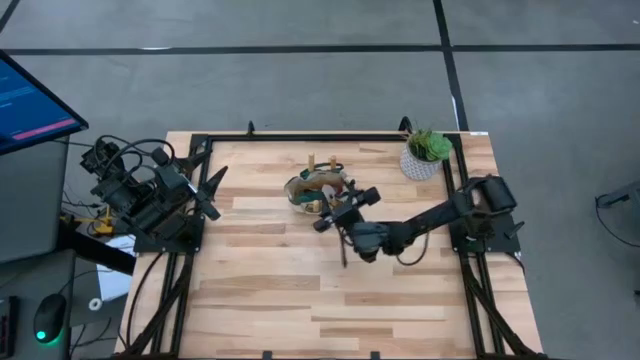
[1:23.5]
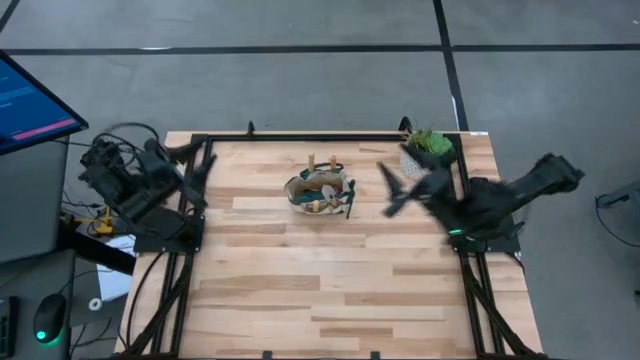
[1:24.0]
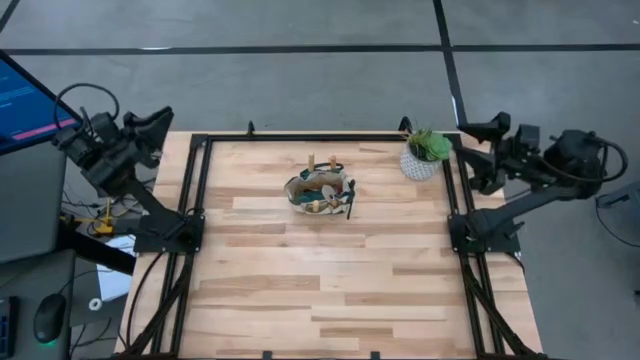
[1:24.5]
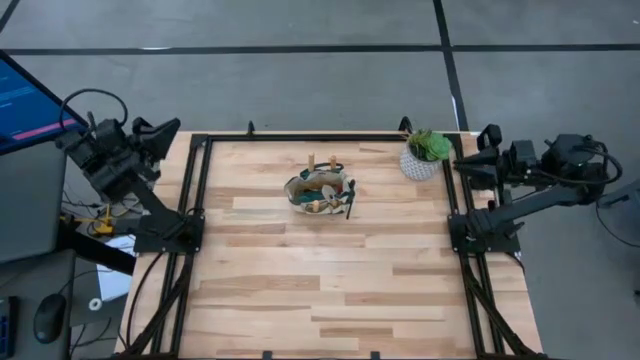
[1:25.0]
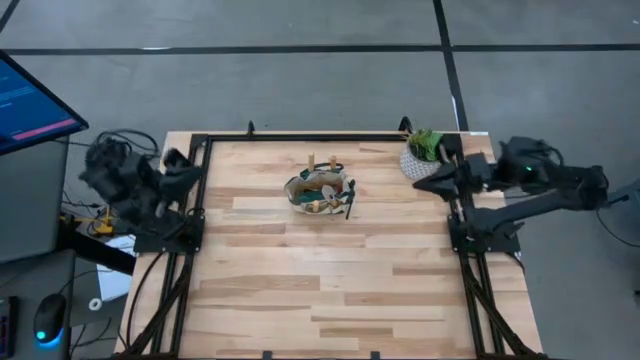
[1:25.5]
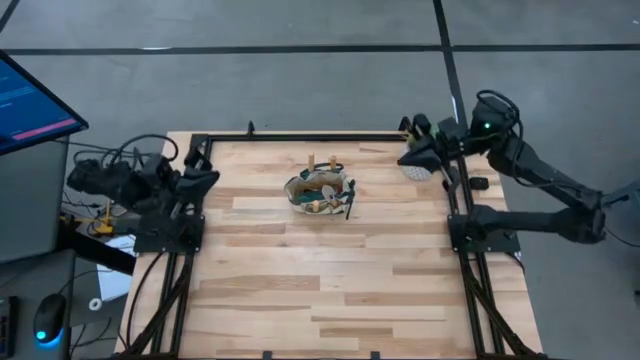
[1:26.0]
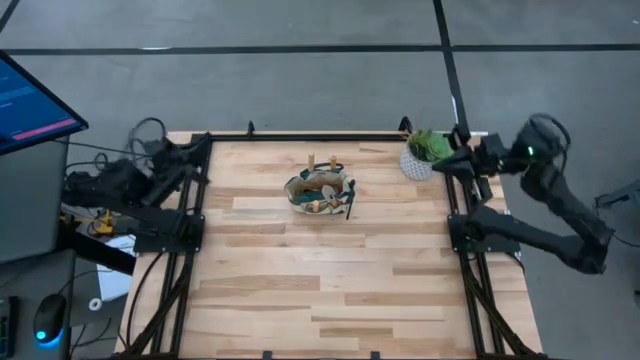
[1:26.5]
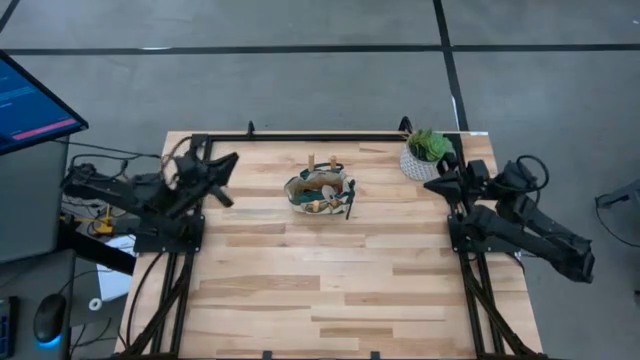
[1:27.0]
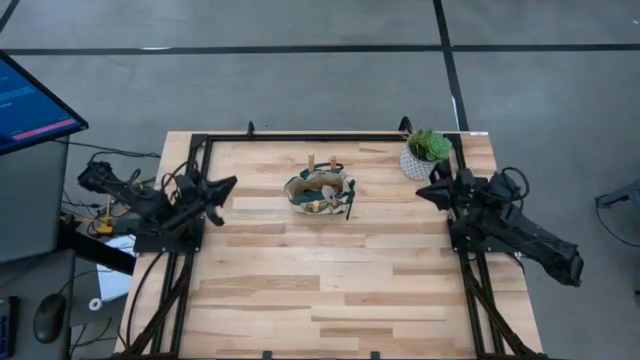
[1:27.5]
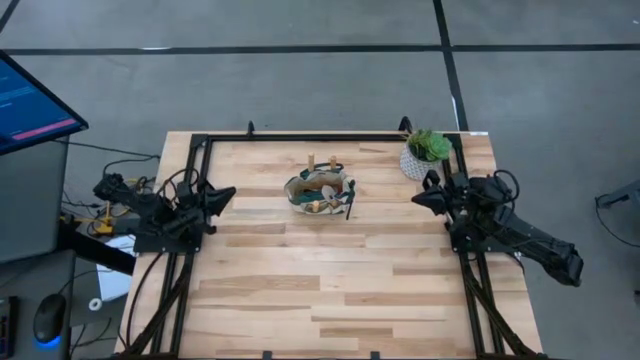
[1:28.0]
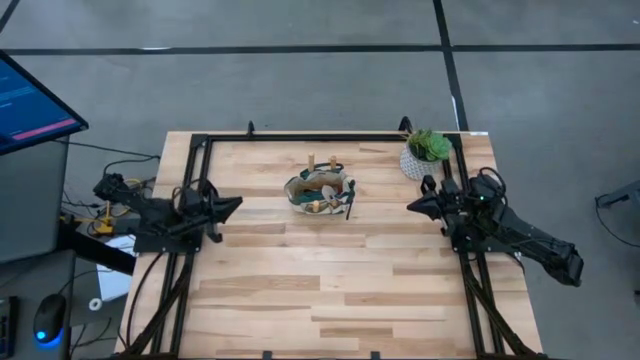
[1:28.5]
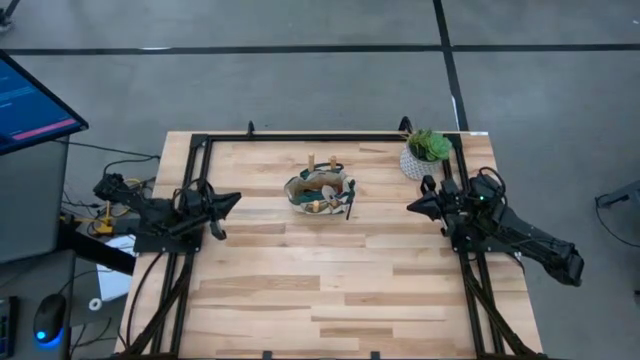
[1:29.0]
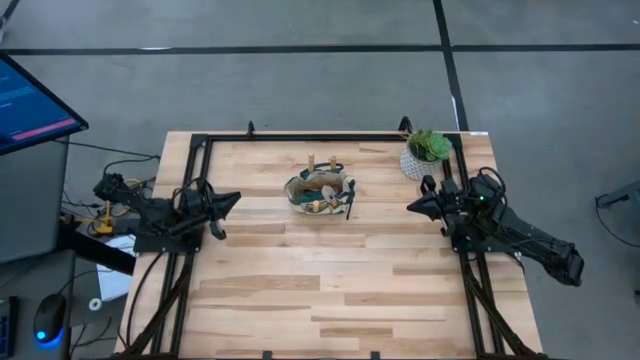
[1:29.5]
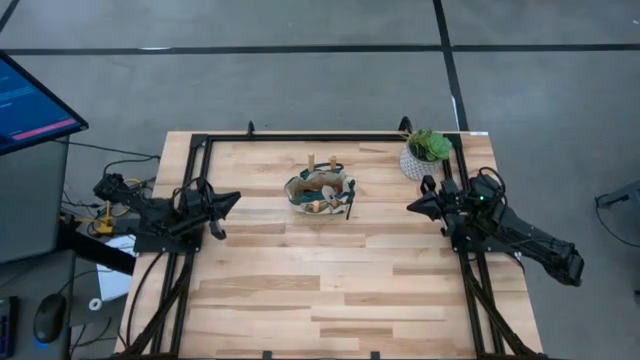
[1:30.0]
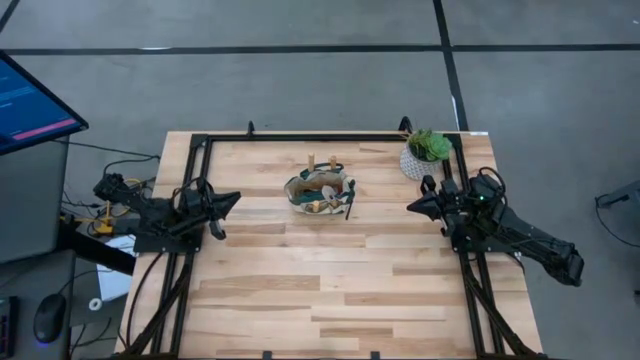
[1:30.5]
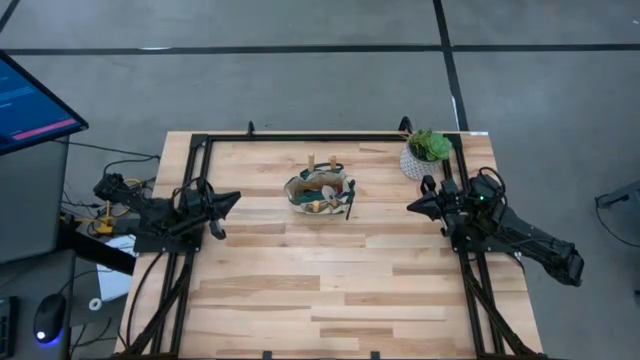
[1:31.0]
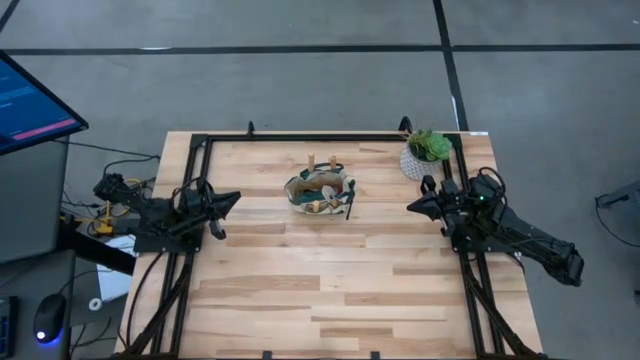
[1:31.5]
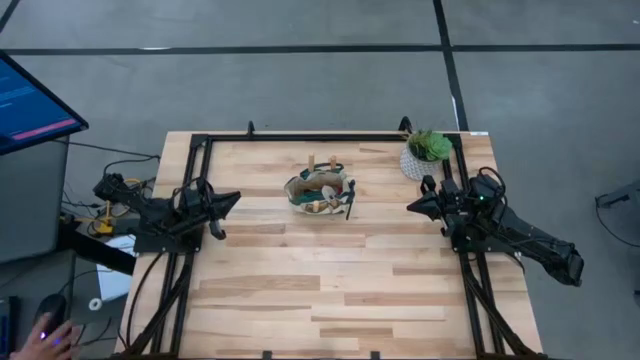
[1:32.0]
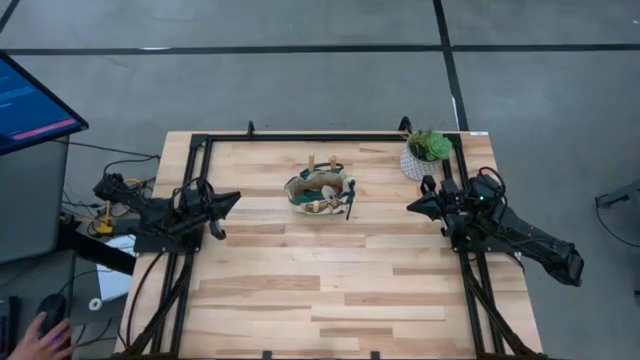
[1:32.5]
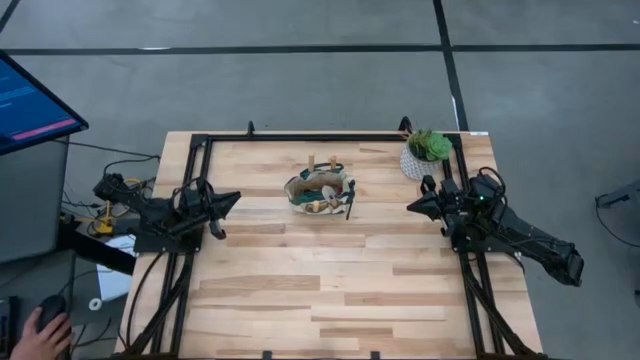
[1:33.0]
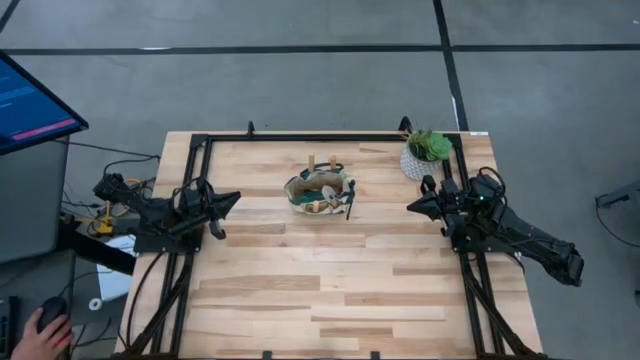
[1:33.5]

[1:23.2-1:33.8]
Task: Pick & Place Garden tools in Gardening bag
Return to Home Position

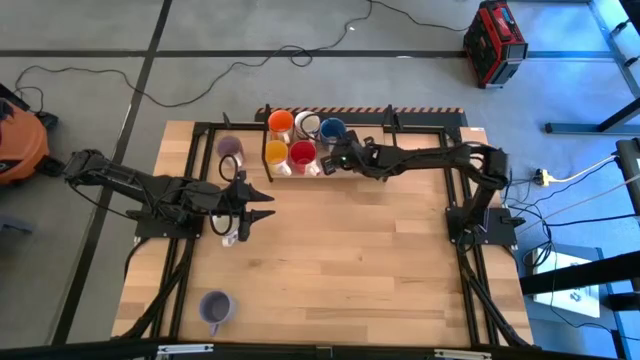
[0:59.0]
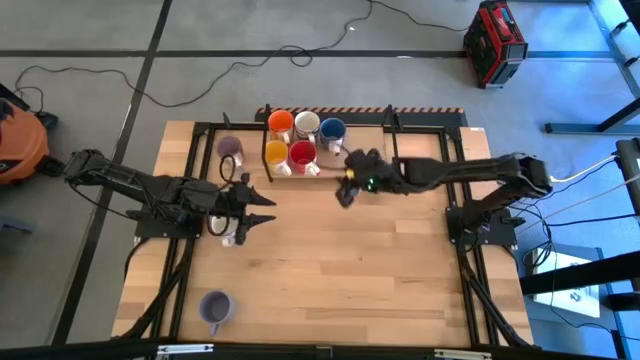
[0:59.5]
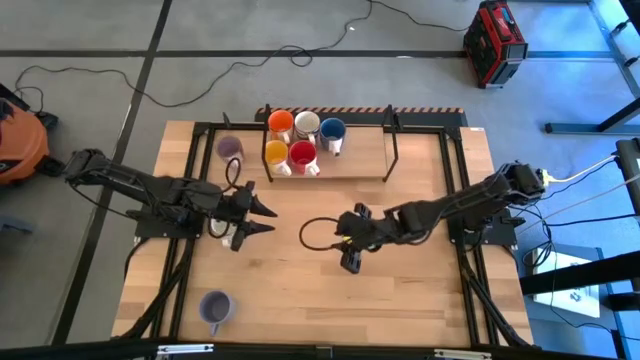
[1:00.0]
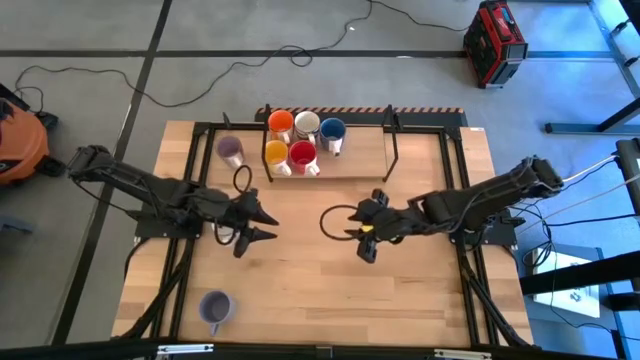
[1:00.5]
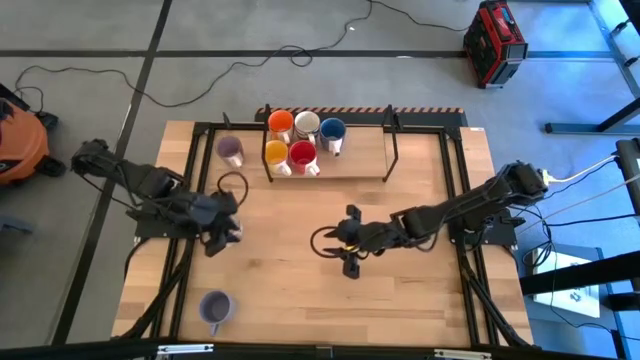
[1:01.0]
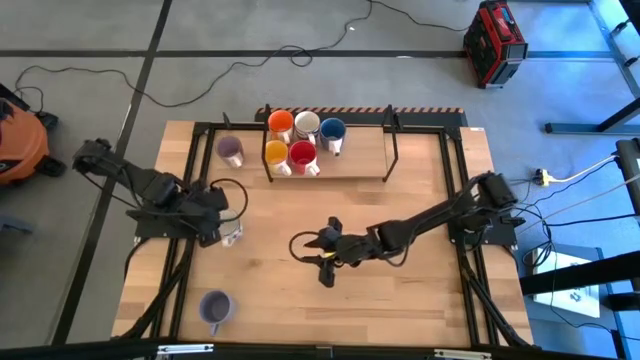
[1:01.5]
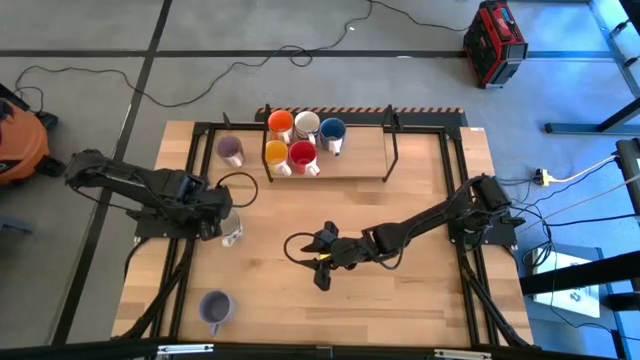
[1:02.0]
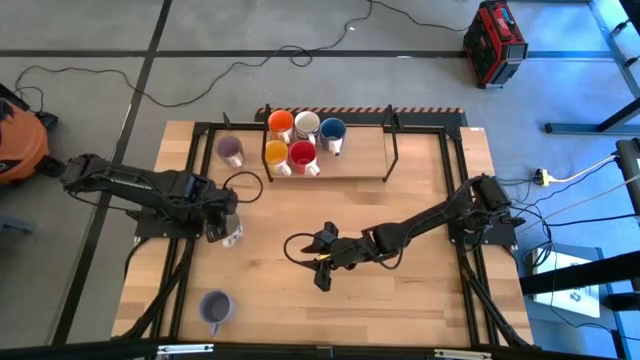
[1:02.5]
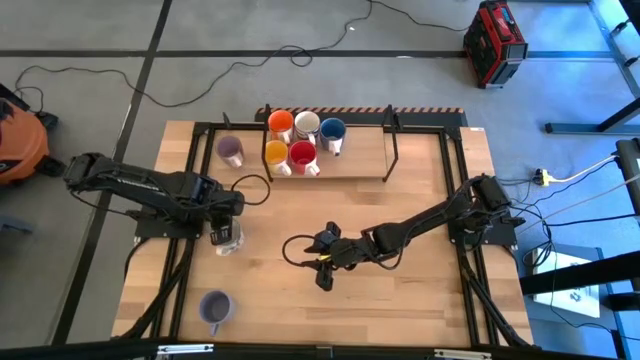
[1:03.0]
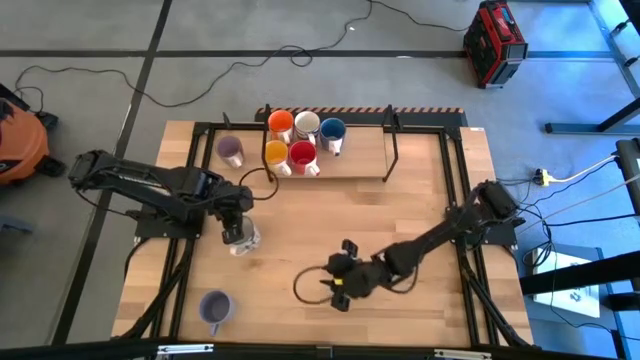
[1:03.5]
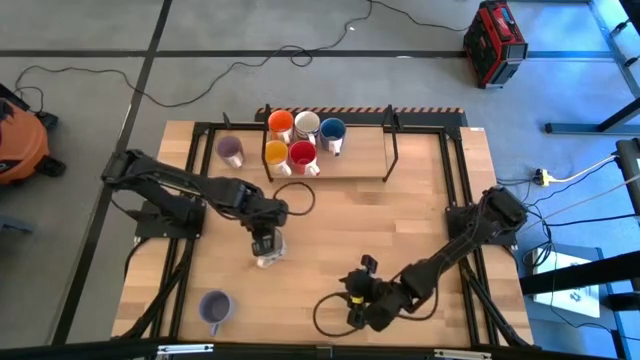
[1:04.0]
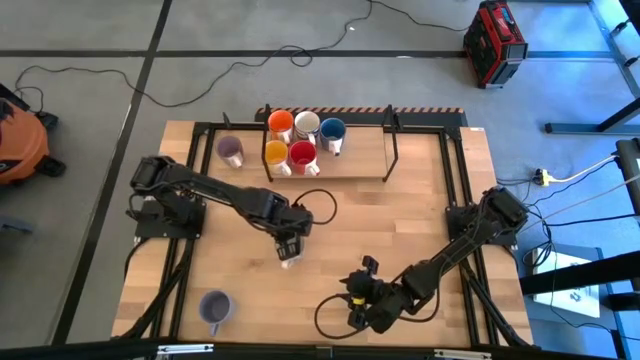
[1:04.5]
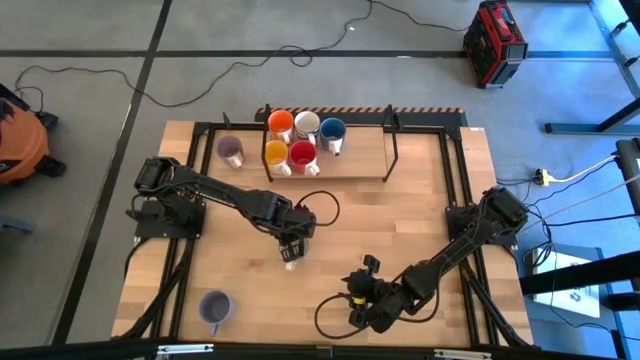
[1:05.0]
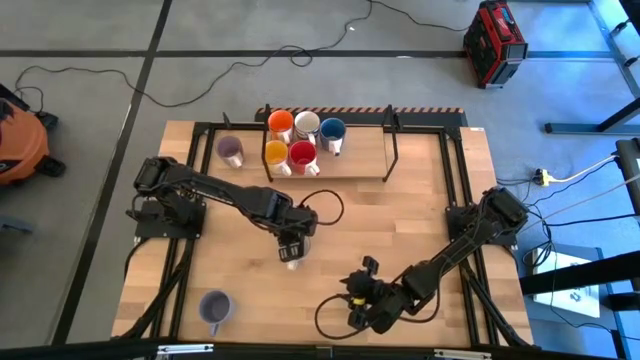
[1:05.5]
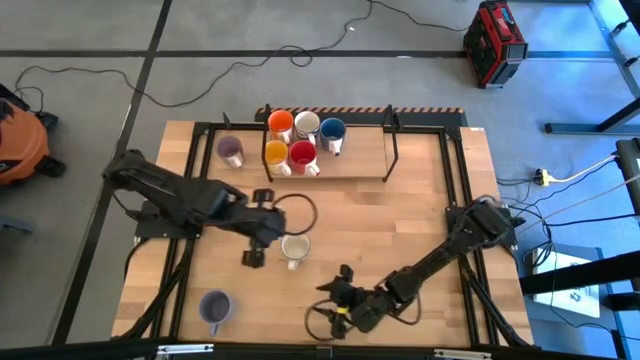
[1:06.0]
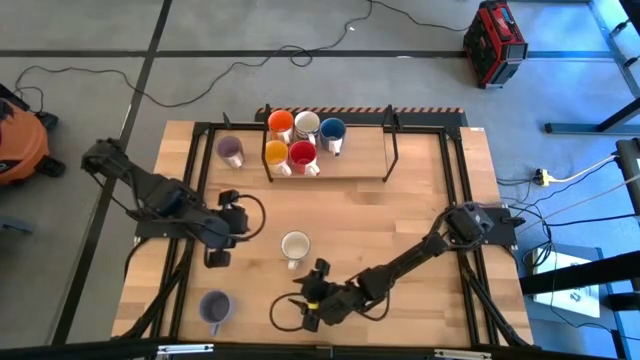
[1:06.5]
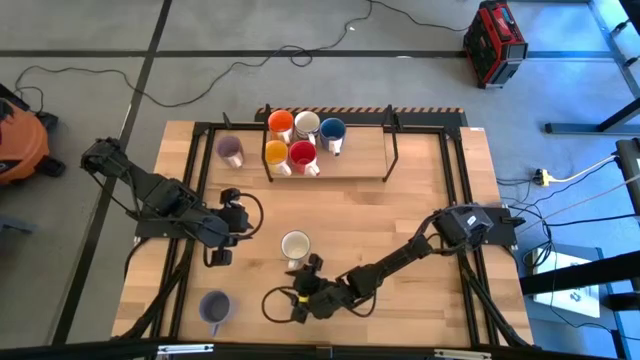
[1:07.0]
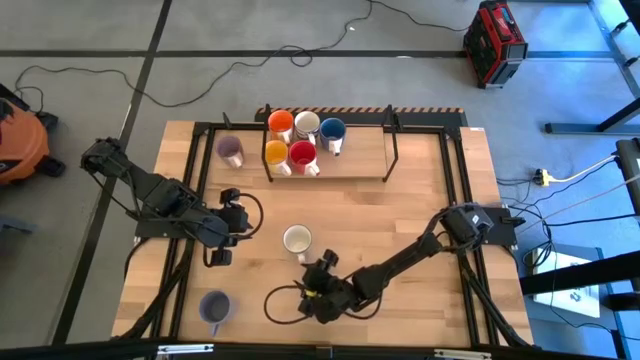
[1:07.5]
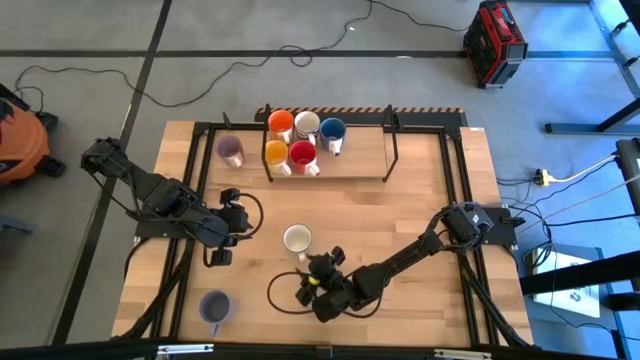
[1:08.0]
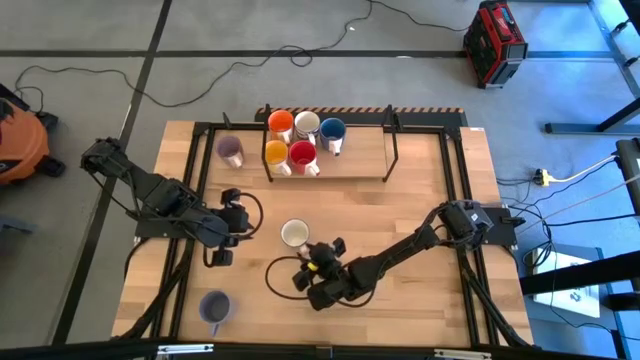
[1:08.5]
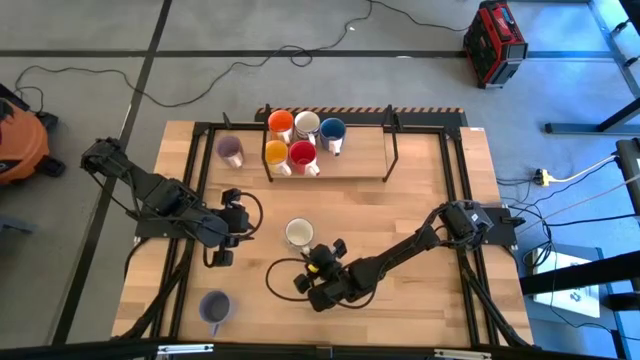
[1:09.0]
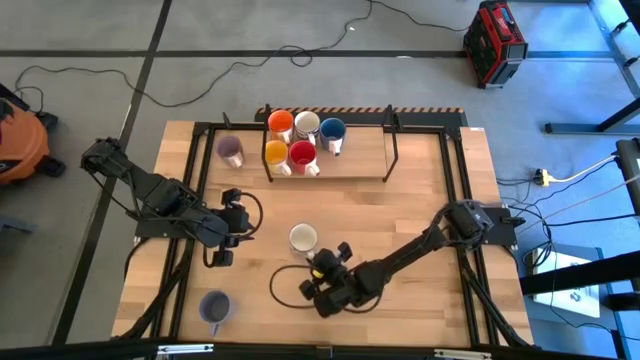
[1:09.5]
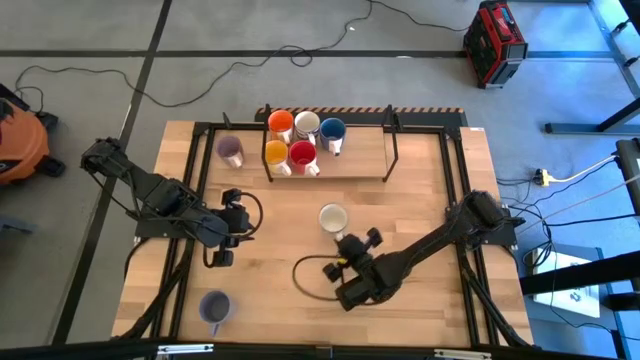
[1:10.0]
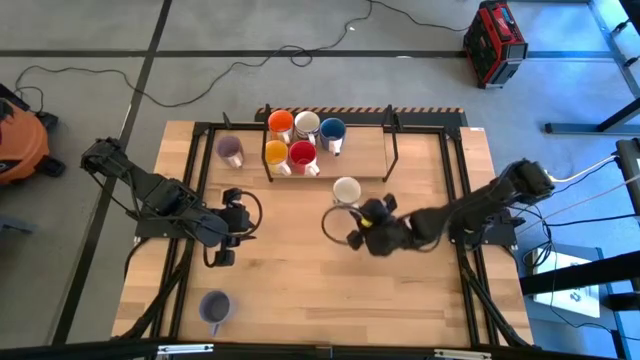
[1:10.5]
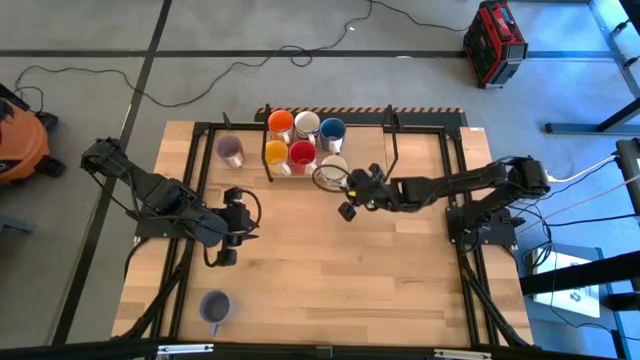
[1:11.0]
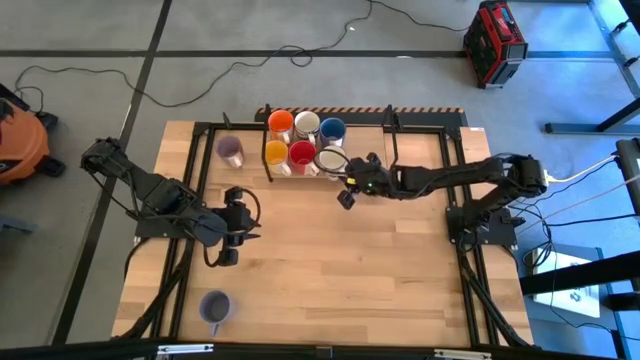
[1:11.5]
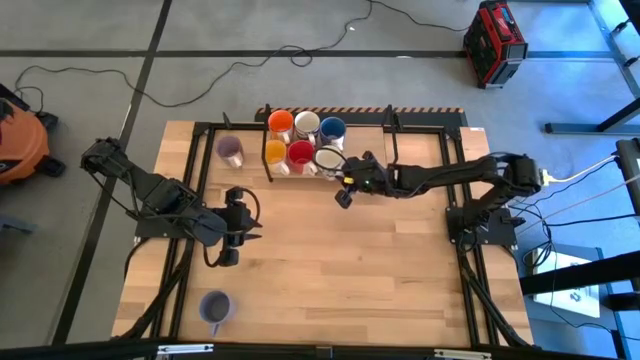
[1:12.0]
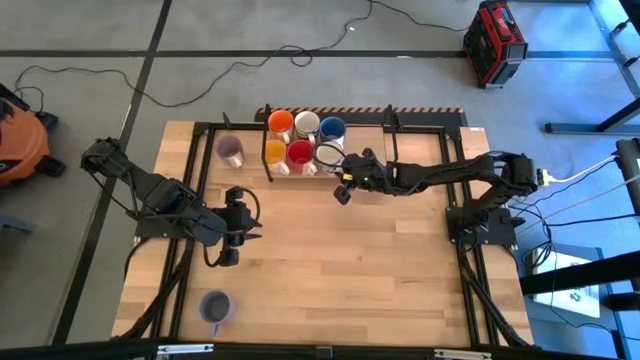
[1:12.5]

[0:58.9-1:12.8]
Task: Place coffee mugs
Put the white mug on the shelf aligned with the blue mug
